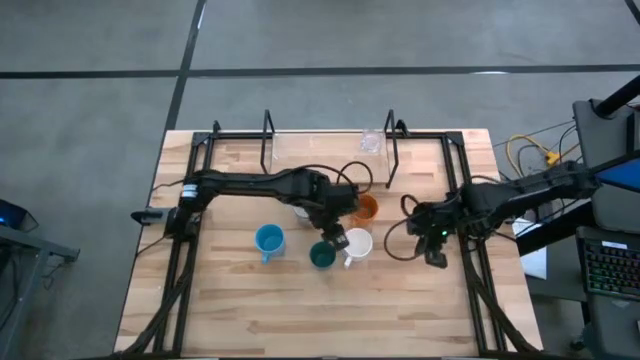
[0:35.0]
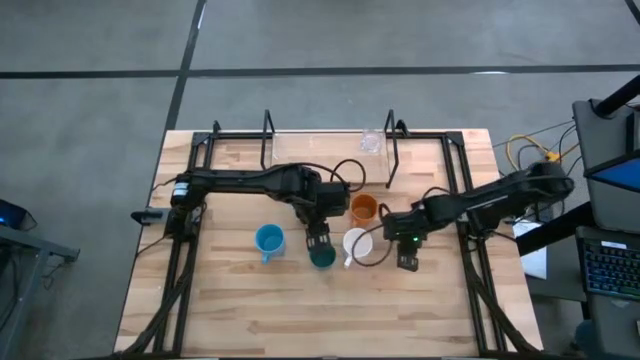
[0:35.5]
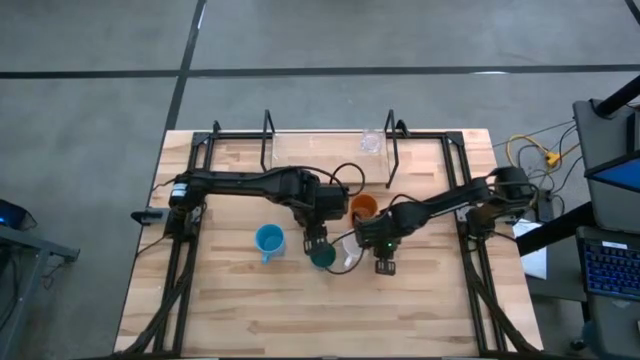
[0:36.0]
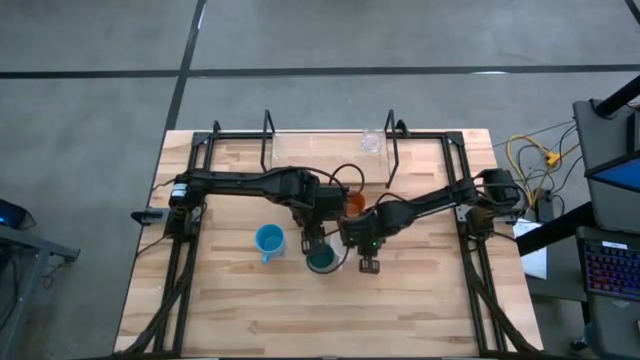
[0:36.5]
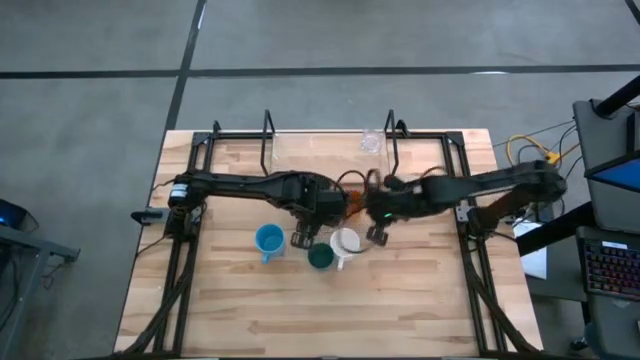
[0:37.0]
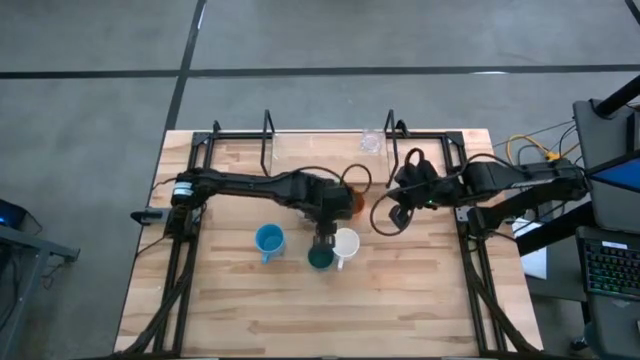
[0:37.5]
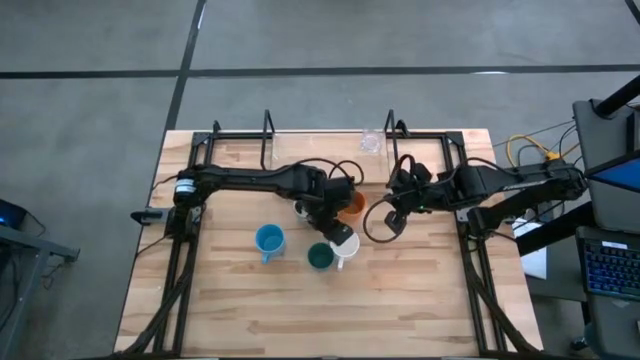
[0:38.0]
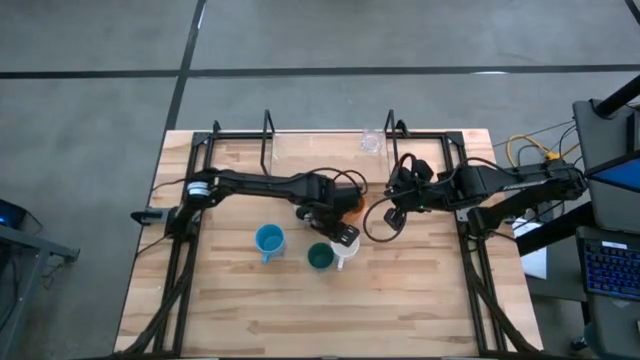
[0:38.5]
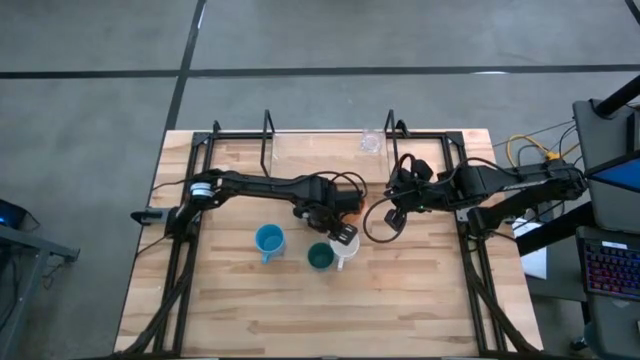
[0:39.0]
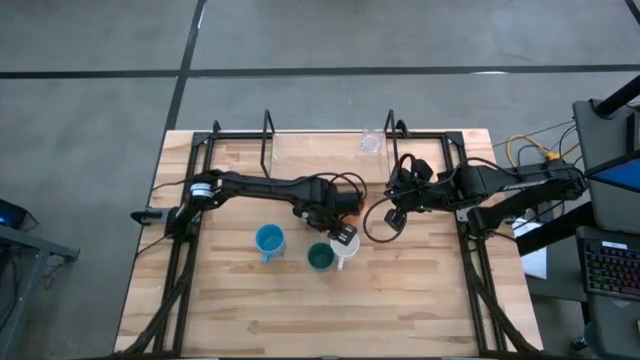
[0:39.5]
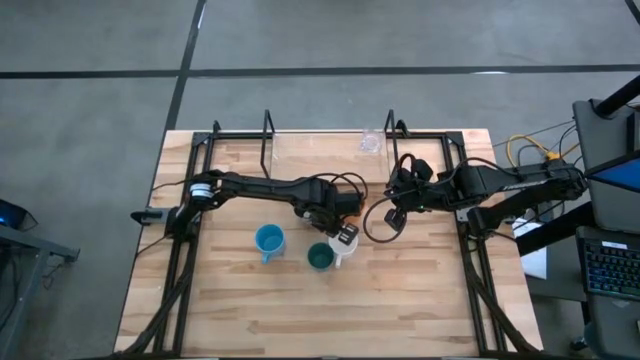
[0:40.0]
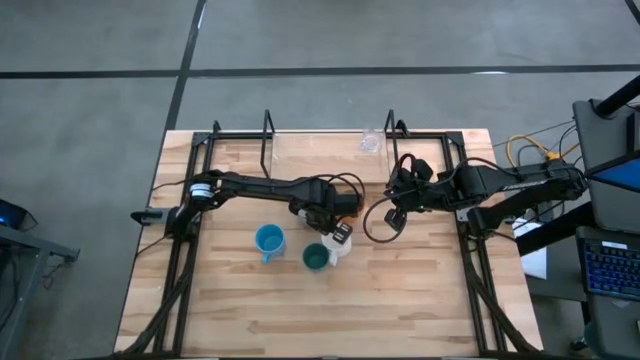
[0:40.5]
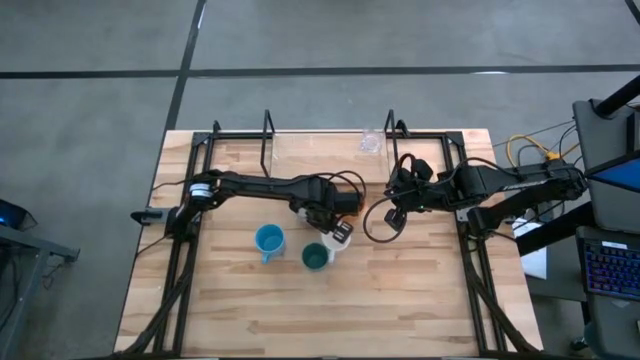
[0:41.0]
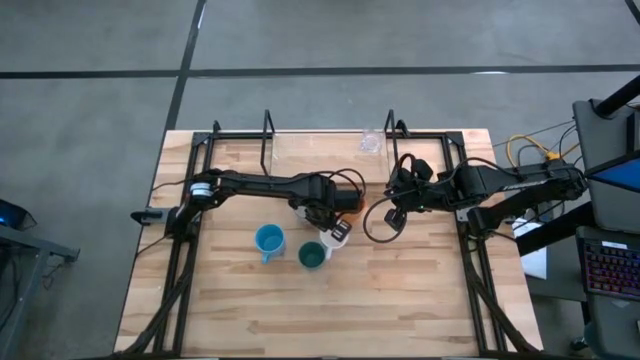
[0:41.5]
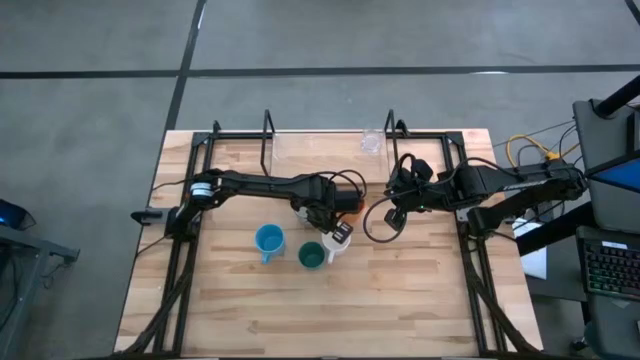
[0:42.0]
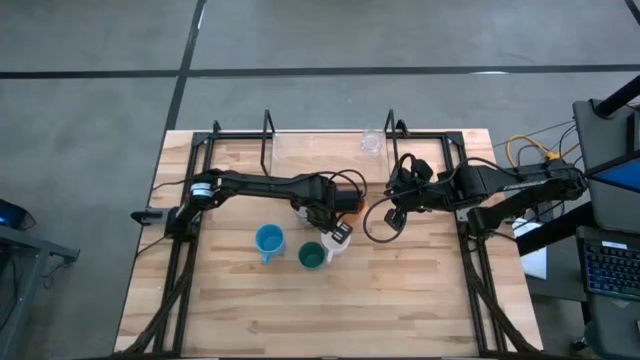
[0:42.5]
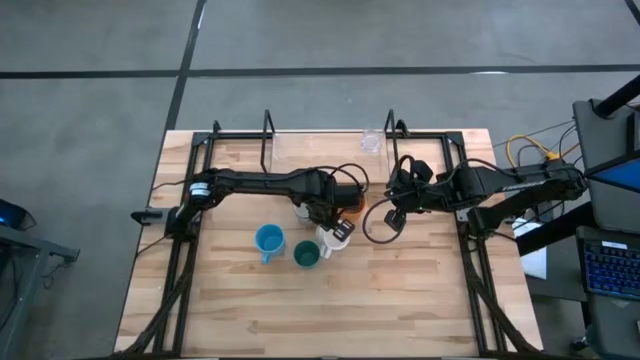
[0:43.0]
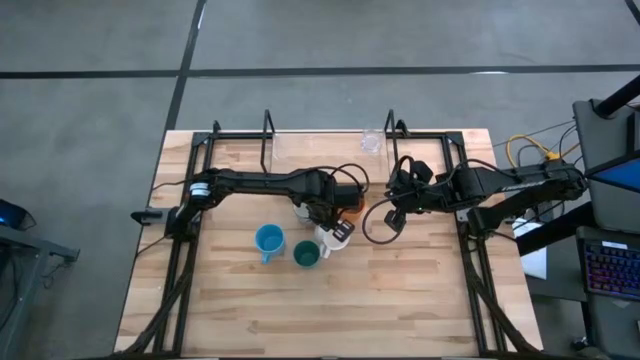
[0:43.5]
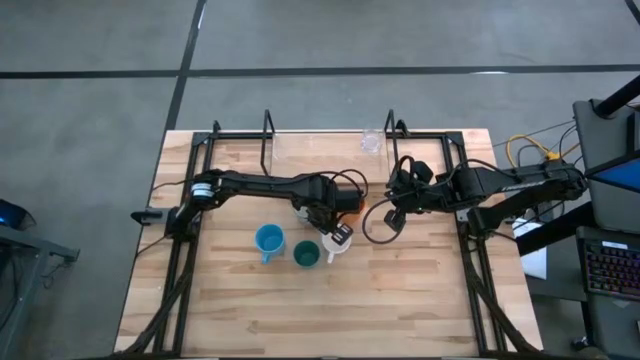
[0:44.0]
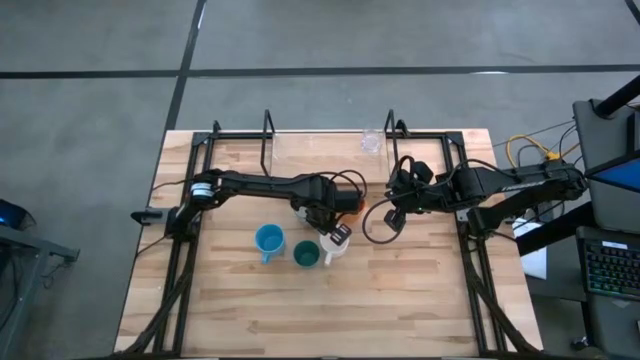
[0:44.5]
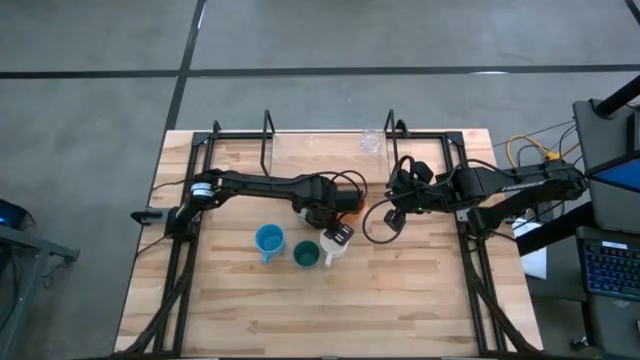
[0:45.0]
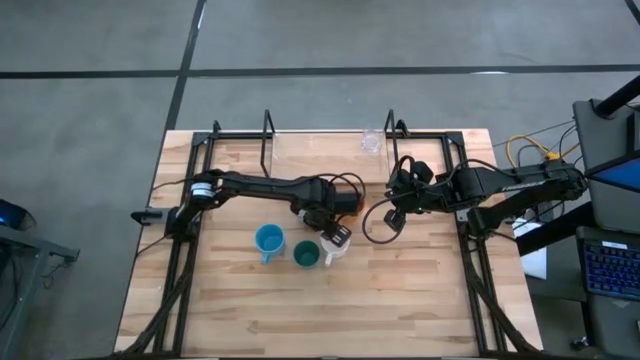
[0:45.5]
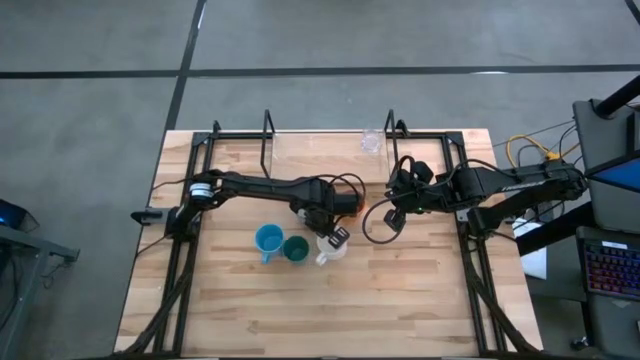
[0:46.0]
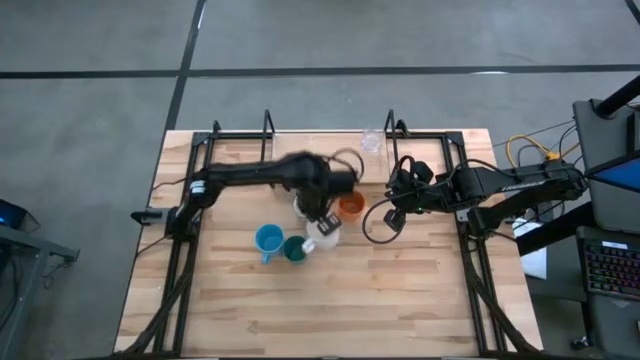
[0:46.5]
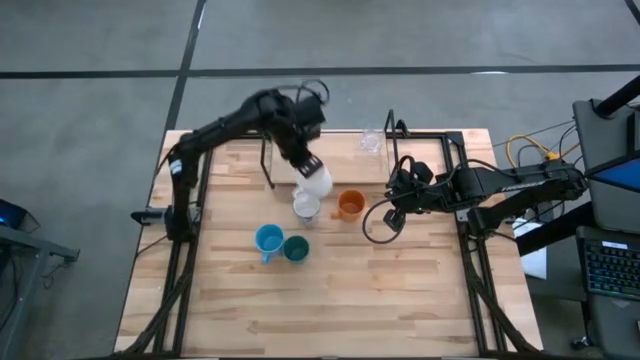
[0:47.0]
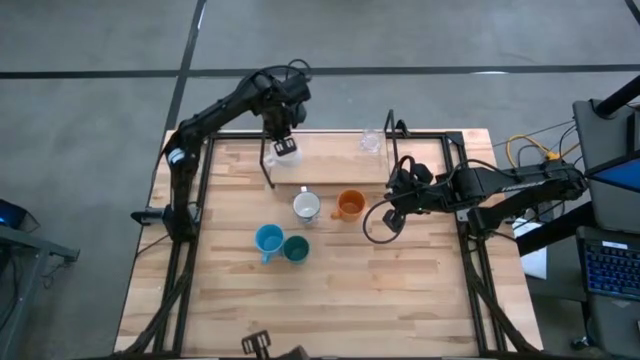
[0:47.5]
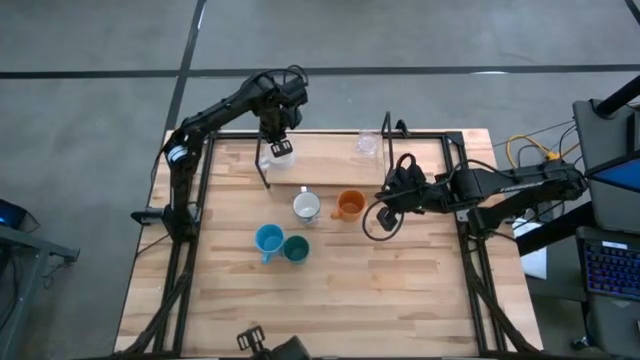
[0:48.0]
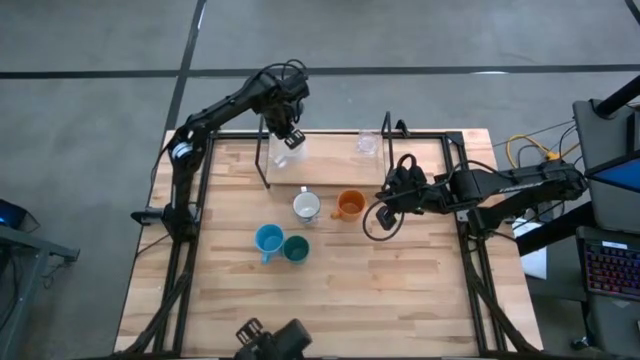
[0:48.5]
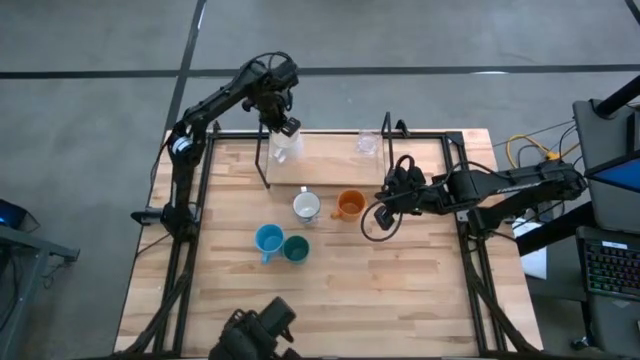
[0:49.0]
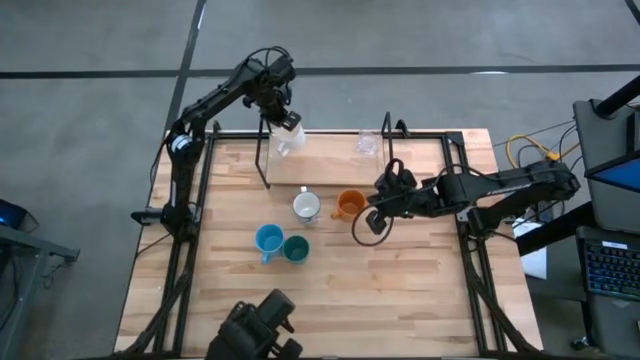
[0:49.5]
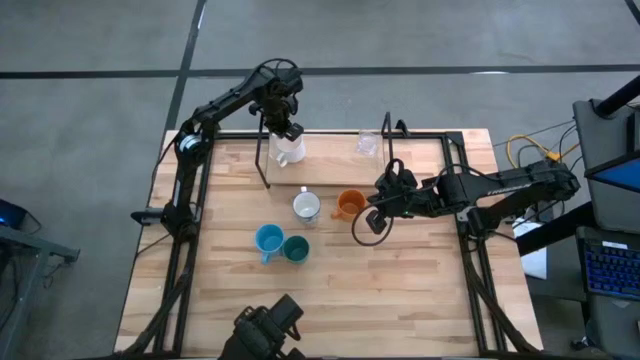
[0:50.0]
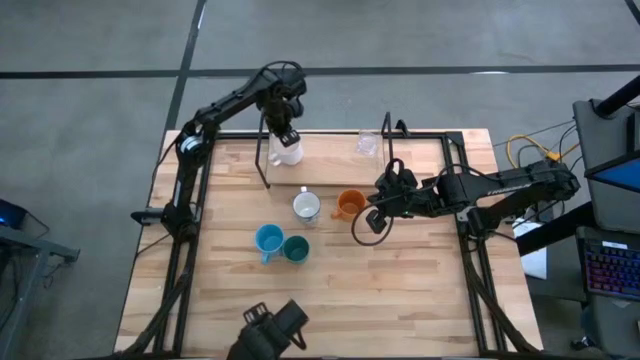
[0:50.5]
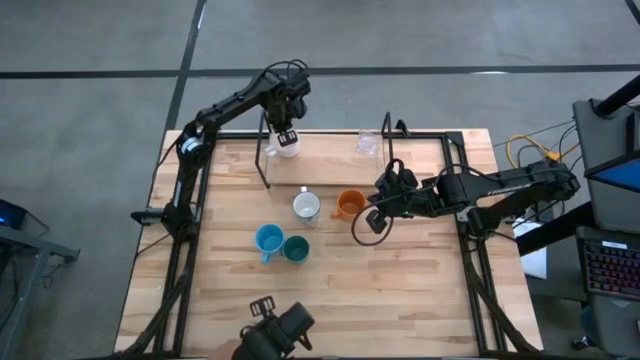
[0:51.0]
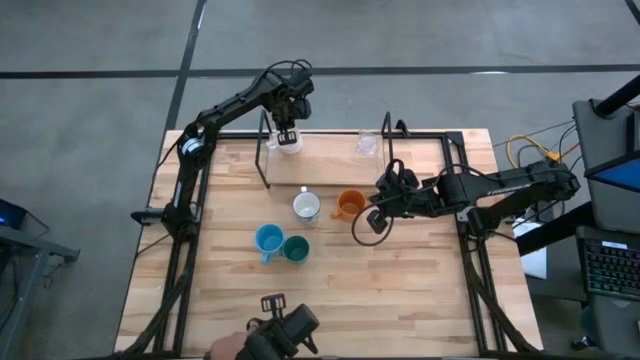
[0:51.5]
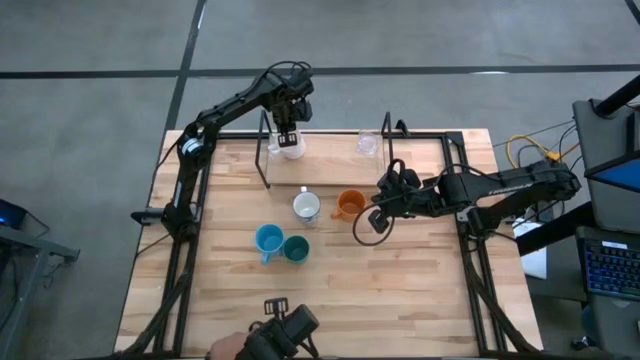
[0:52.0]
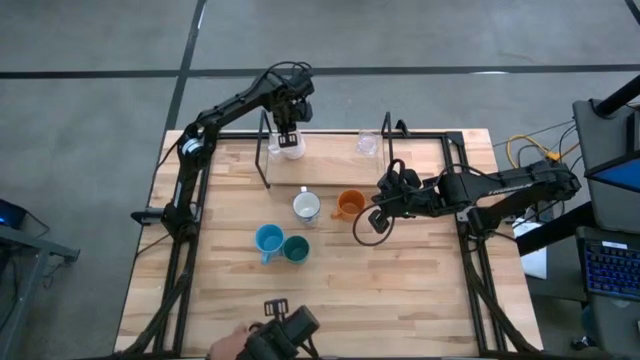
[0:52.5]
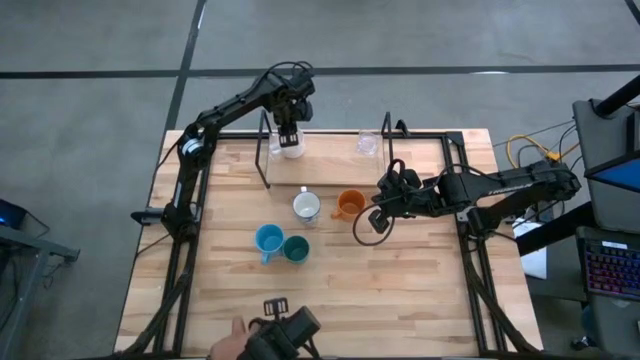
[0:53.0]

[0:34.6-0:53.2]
Task: Stack small to large cups/mugs on shelf
Put the white mug on the shelf

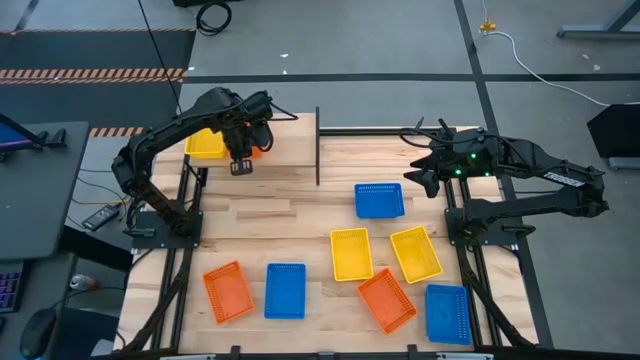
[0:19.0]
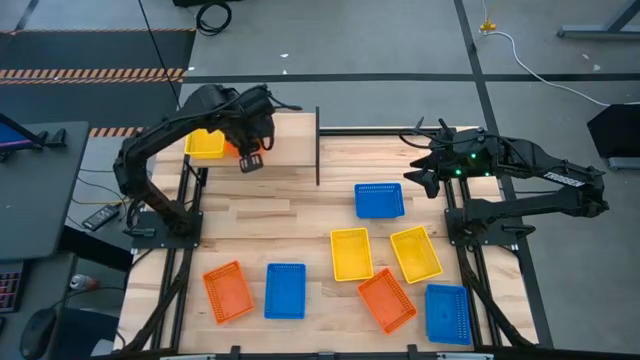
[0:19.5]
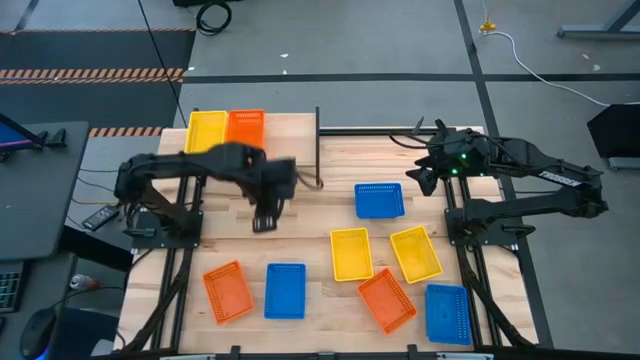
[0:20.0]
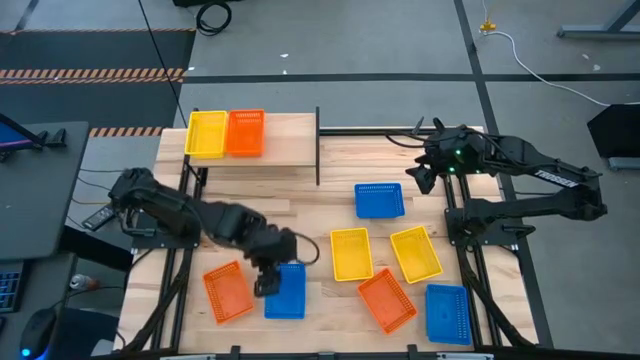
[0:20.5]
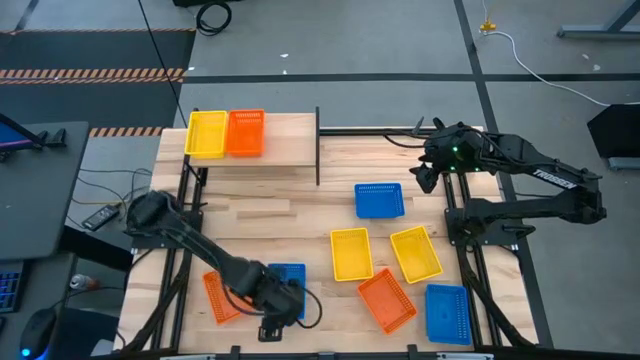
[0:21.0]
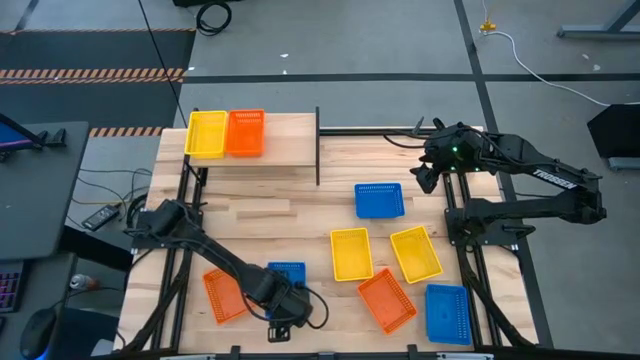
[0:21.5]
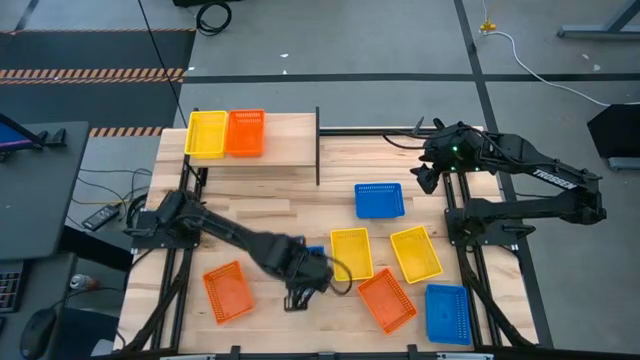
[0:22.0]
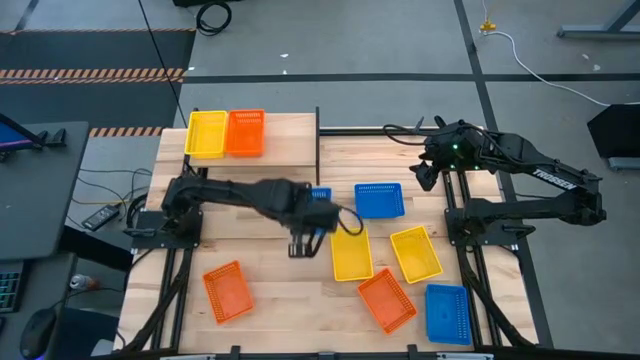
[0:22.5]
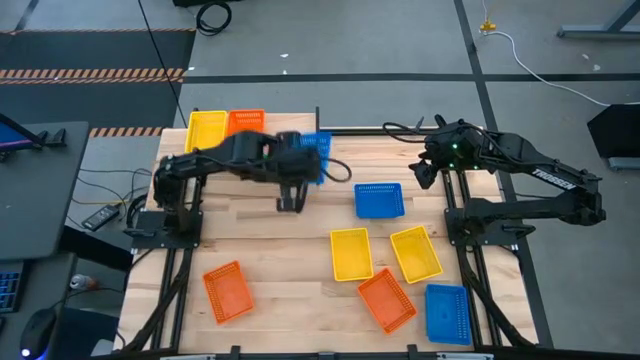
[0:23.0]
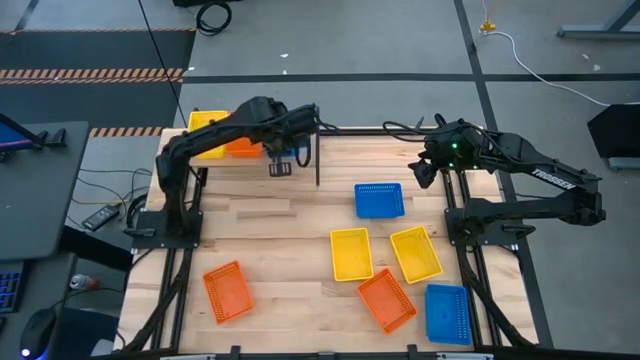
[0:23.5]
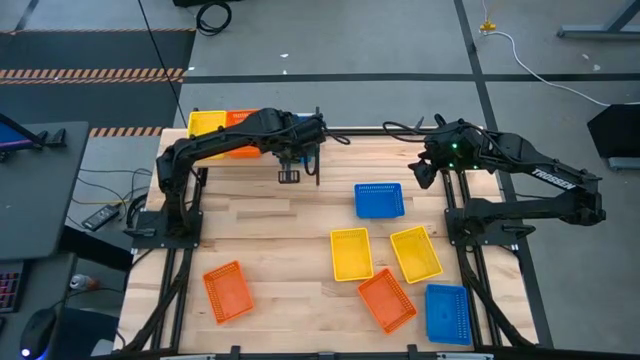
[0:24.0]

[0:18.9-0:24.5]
Task: Stack baskets on shelf by color
Put the bottom left blue bin on the shelf
